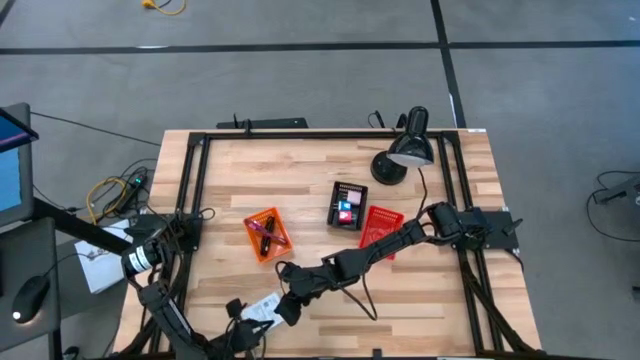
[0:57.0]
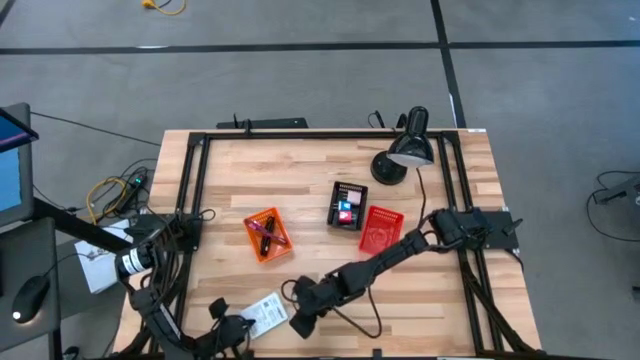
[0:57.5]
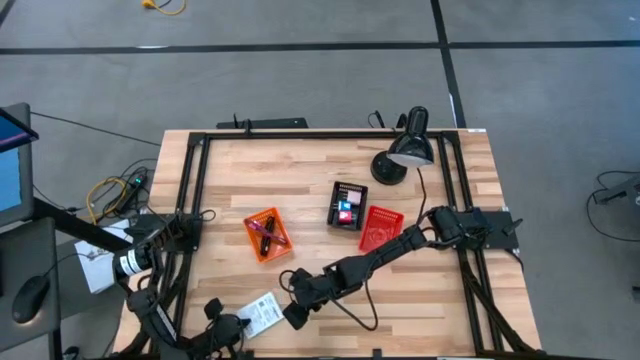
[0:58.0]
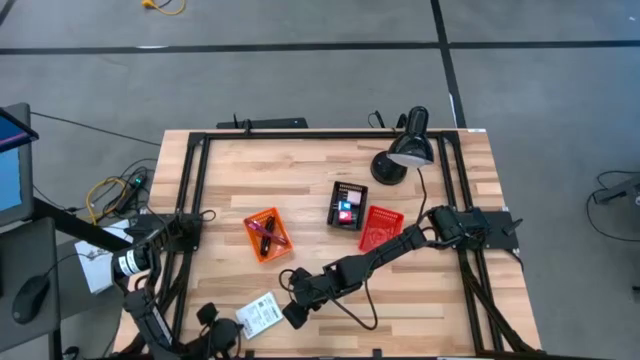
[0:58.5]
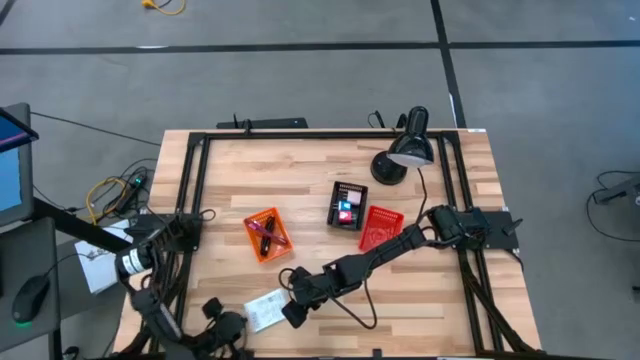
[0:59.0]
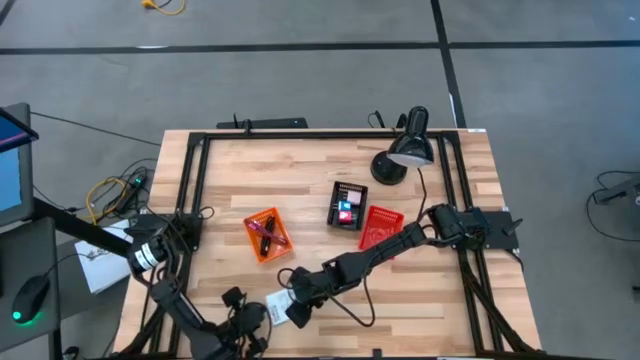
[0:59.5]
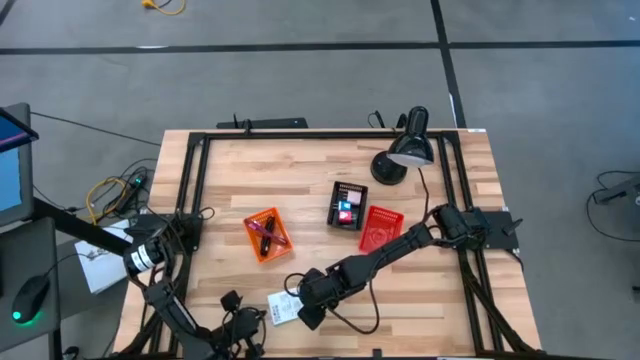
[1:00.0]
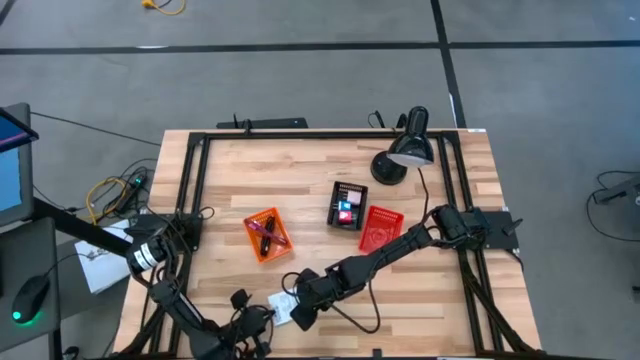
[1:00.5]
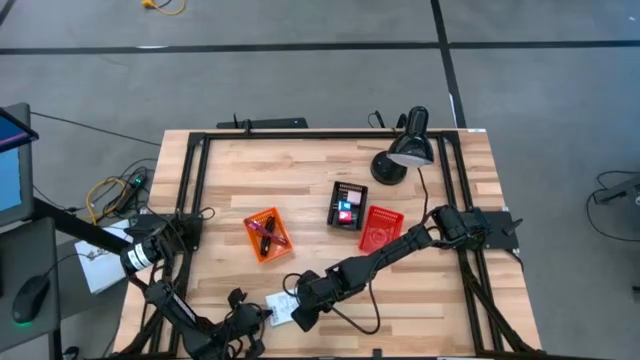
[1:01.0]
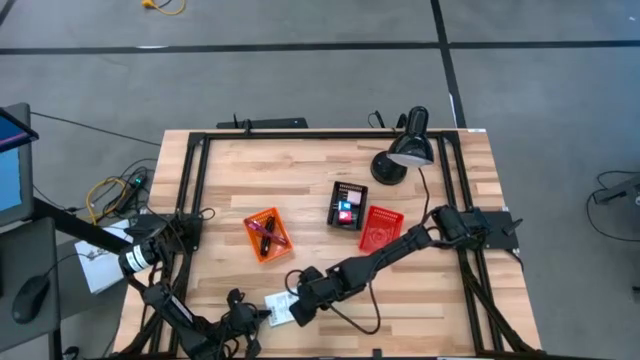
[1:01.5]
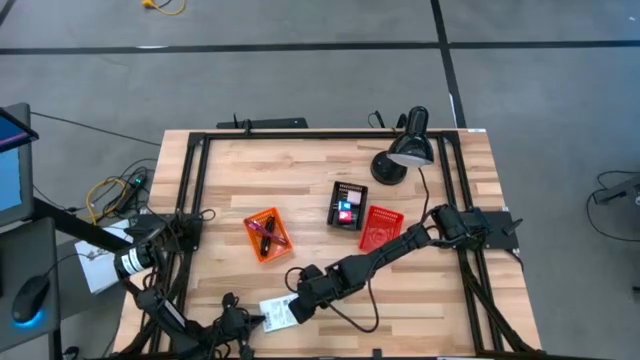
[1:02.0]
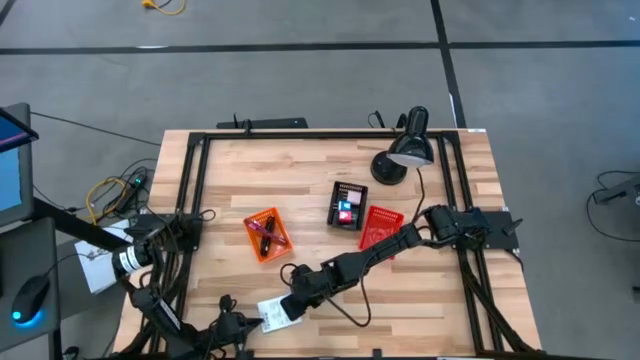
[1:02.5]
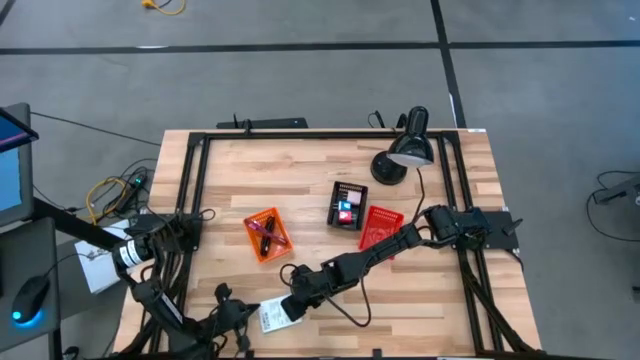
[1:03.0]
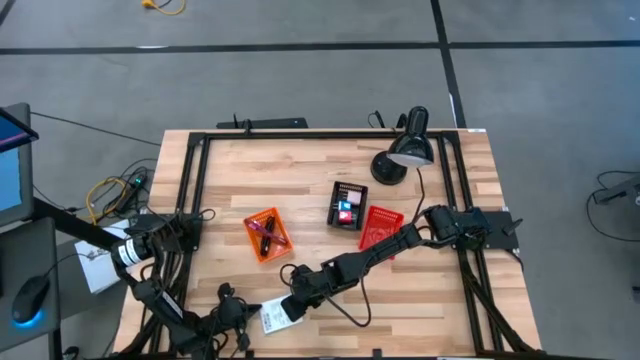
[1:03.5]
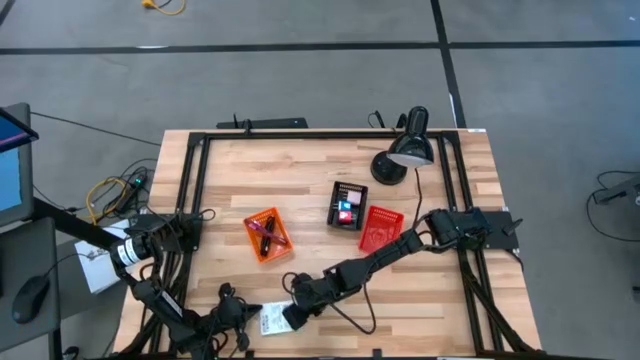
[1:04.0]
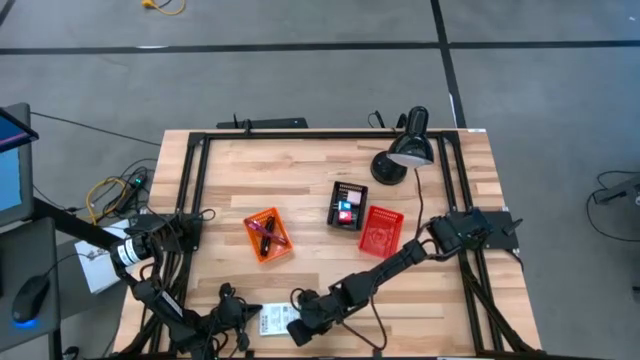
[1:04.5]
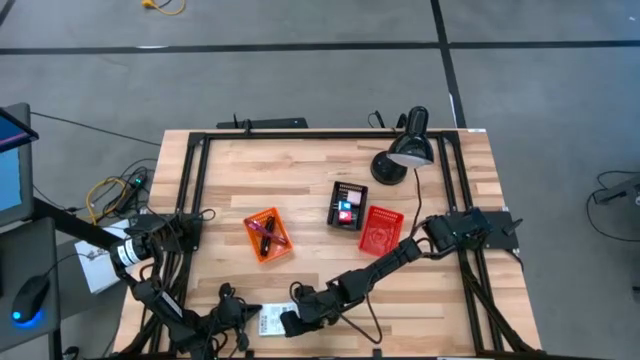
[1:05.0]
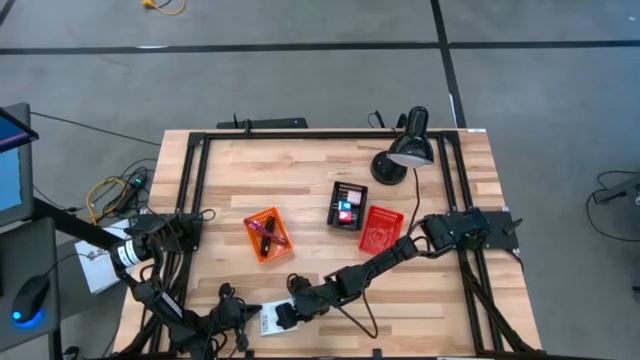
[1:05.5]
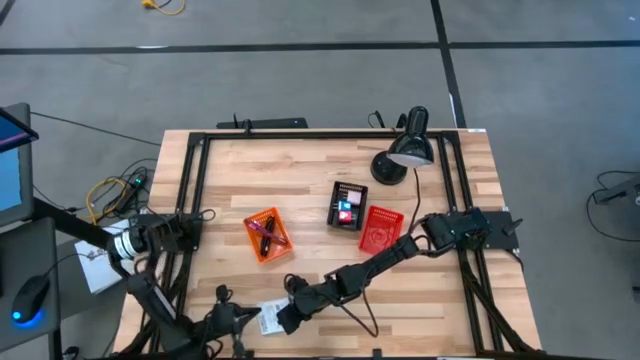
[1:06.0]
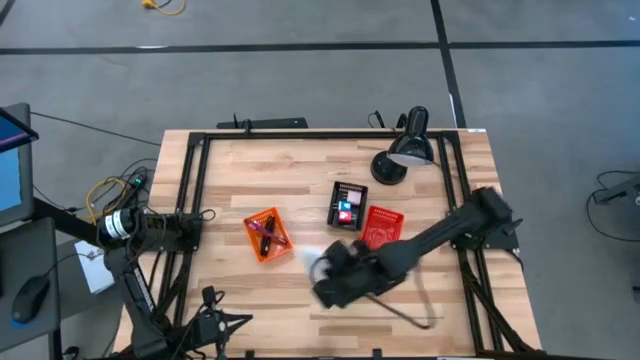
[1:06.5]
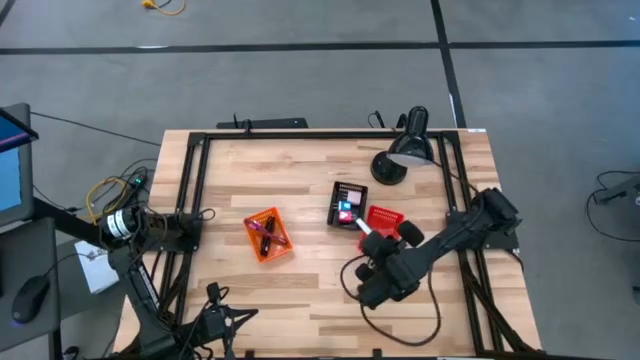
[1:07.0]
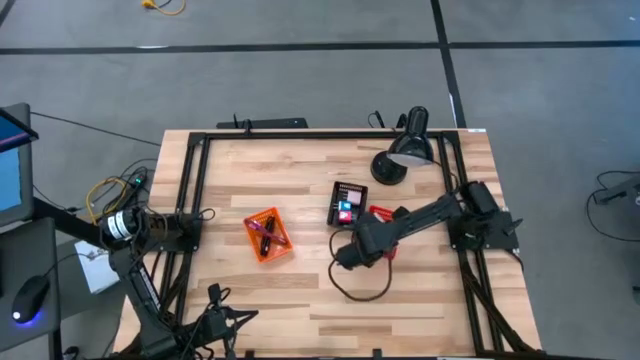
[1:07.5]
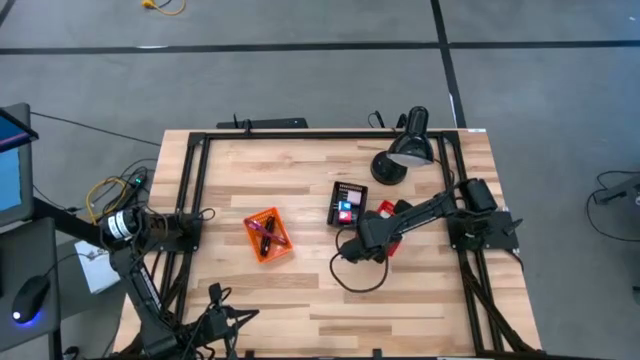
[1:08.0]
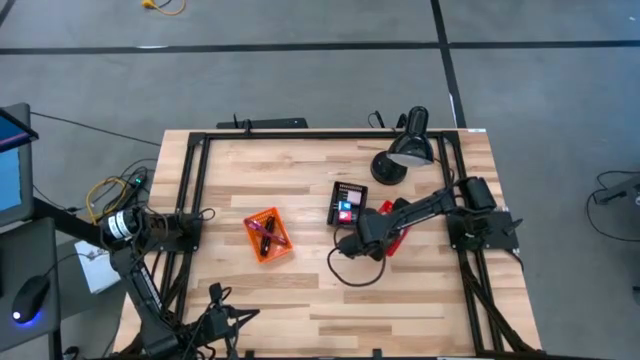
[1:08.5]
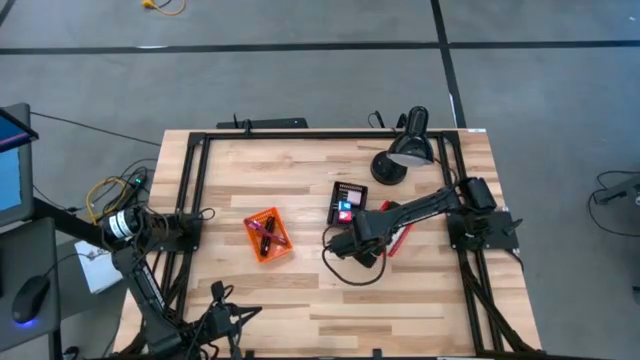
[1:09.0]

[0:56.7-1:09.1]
Task: Pick and place items into bin
Put the white card reader box into the red bin

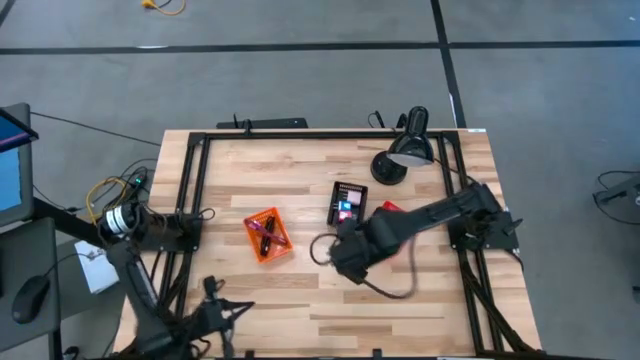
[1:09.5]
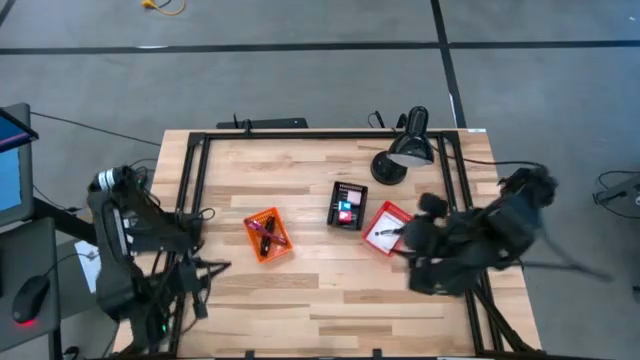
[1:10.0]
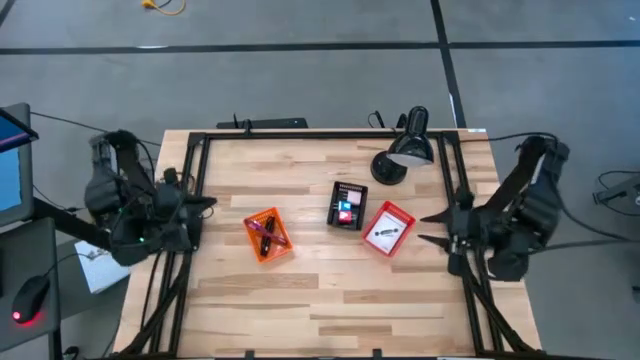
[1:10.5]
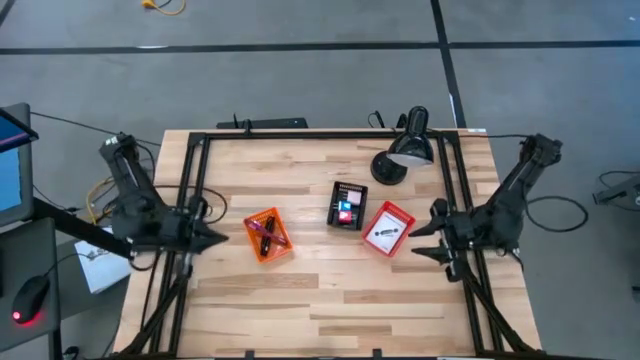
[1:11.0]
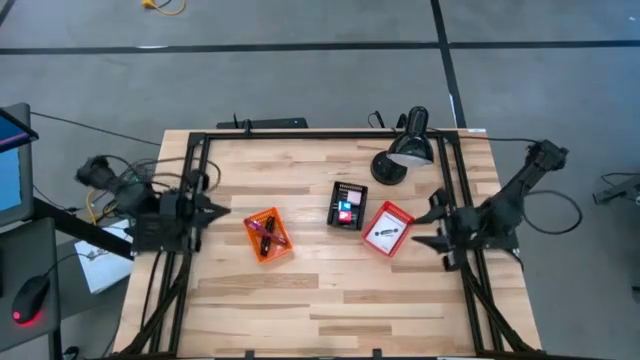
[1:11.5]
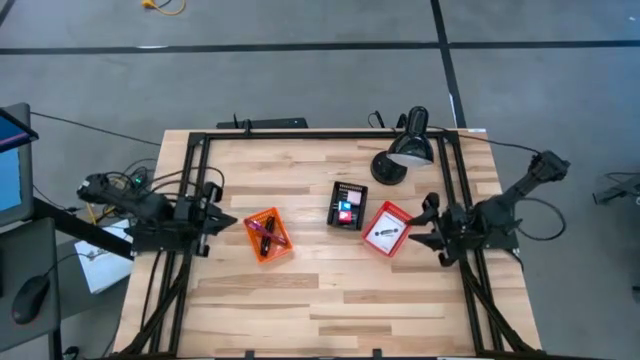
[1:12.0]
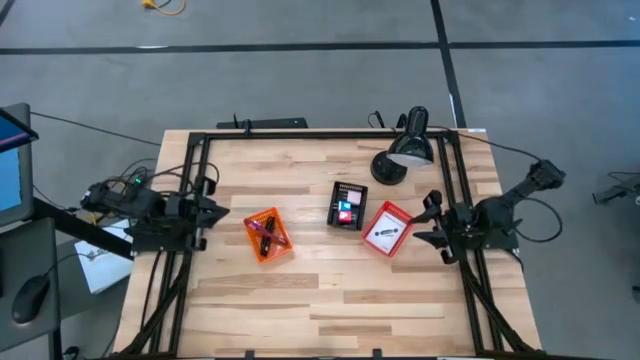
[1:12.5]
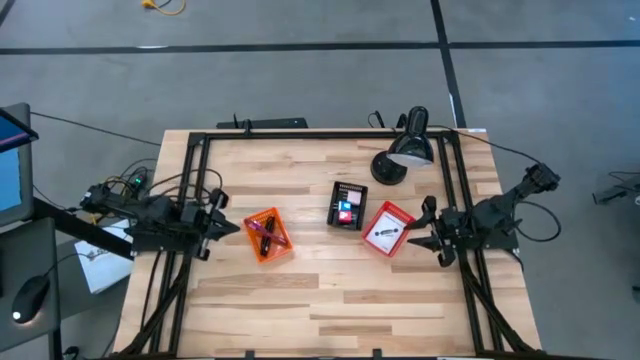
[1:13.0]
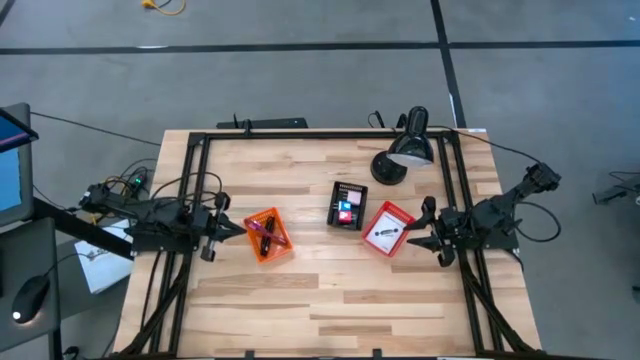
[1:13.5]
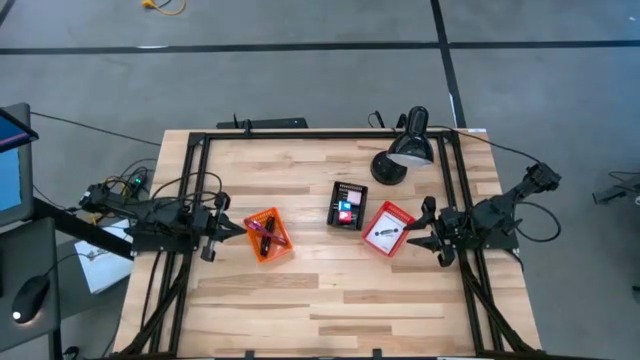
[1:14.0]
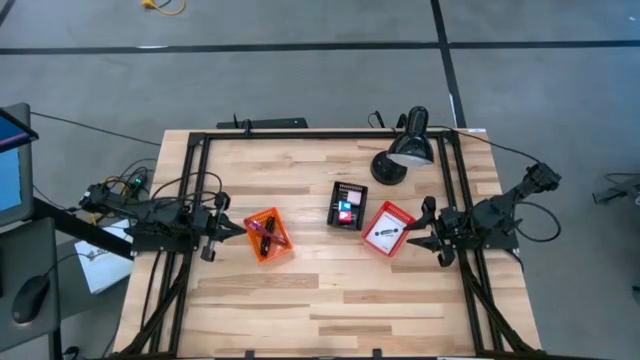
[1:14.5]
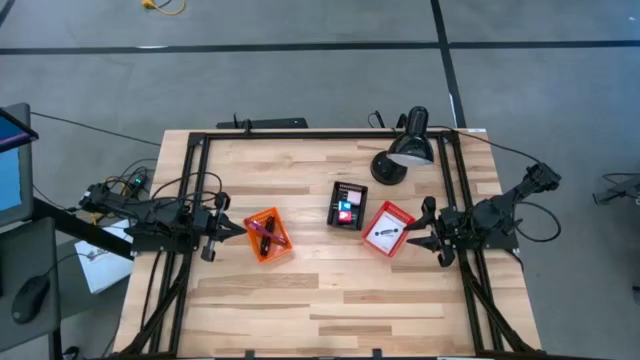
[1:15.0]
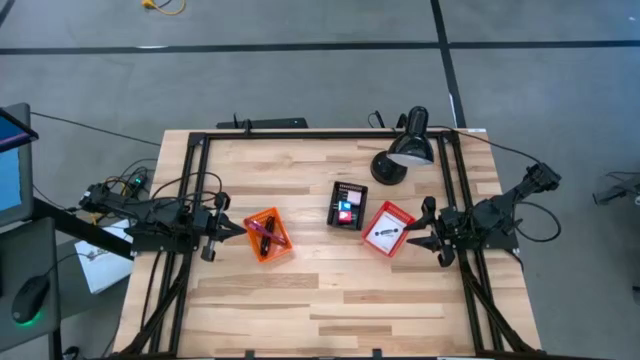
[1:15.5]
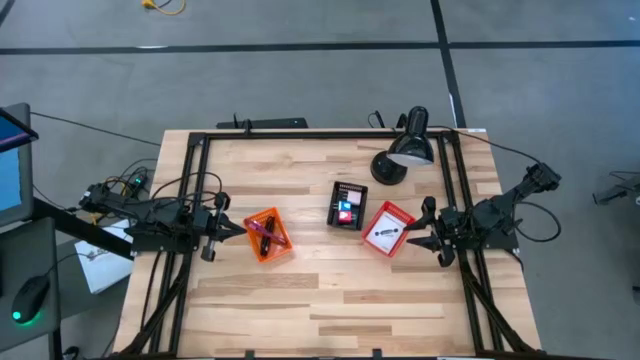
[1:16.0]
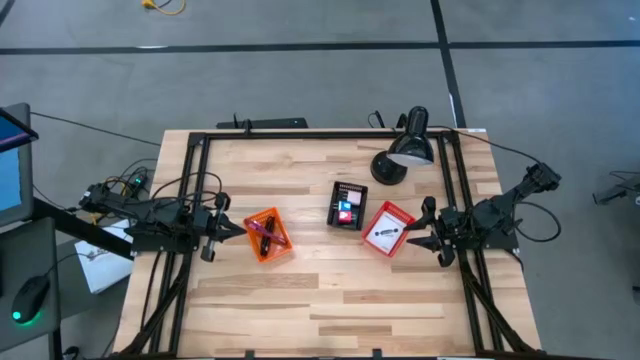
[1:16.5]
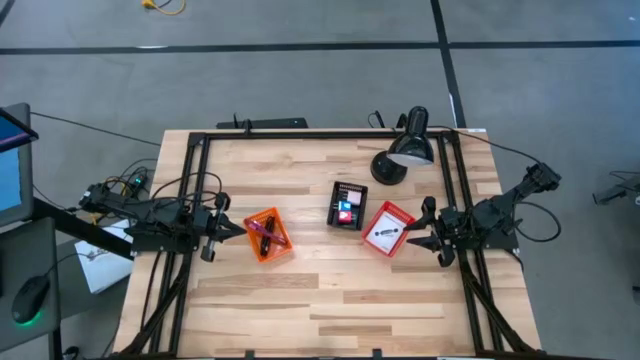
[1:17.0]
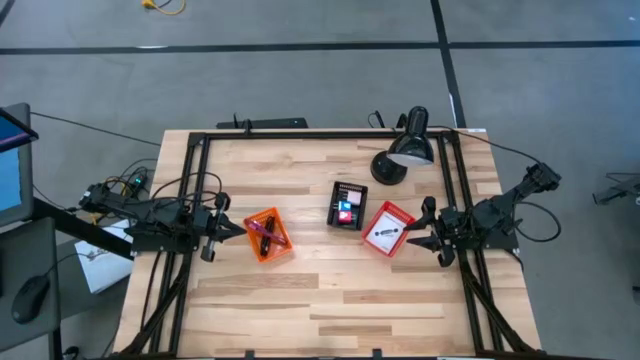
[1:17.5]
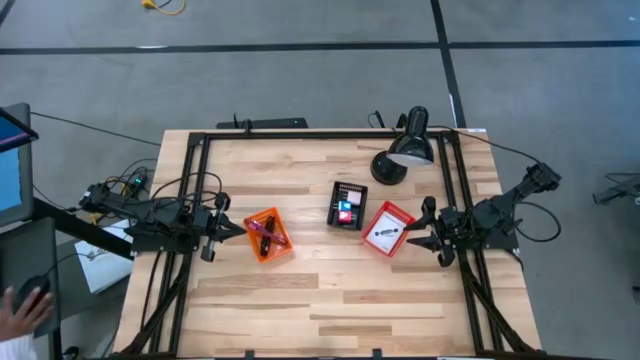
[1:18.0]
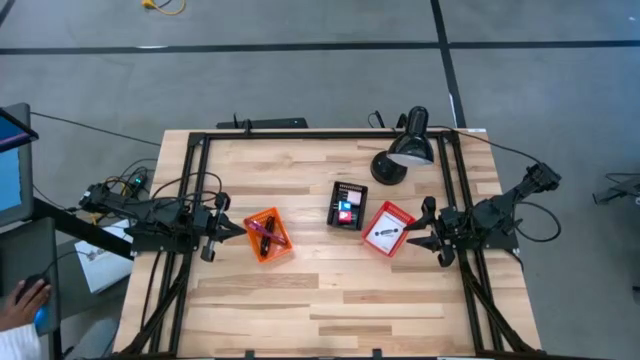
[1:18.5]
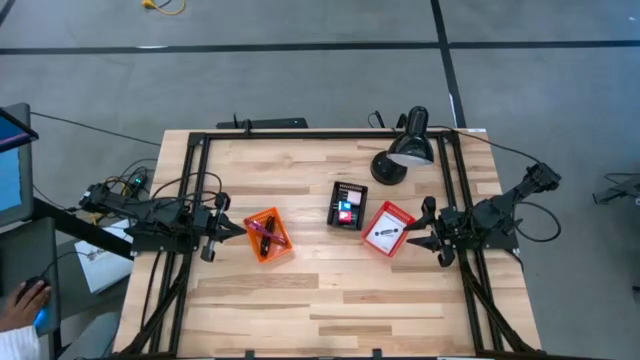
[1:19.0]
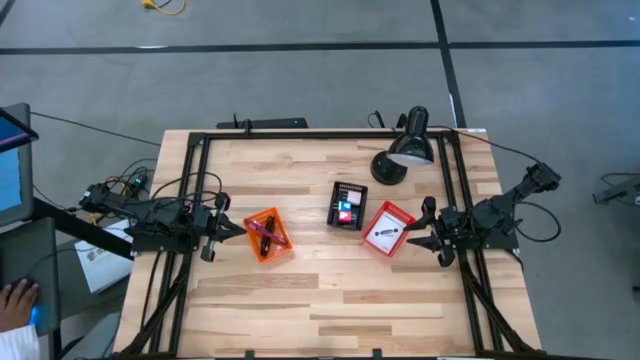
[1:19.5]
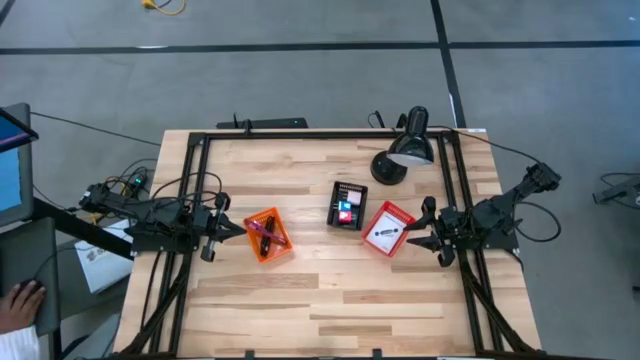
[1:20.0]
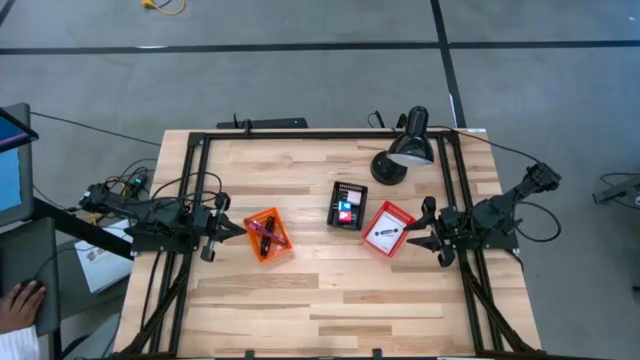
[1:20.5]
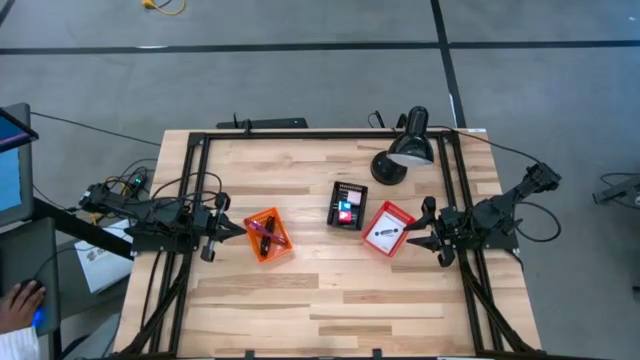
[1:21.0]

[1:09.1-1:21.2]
Return to Home Position
